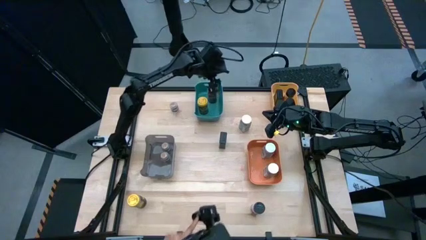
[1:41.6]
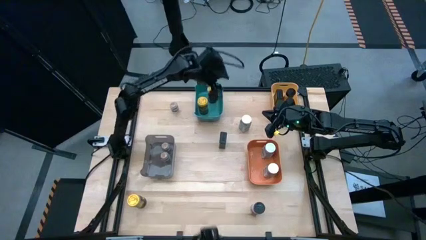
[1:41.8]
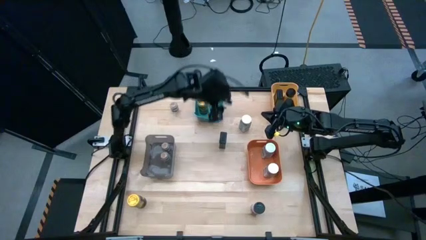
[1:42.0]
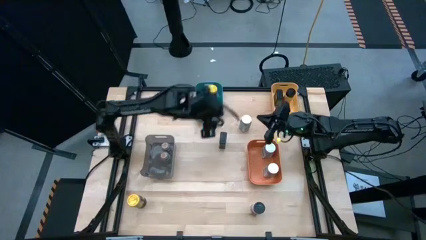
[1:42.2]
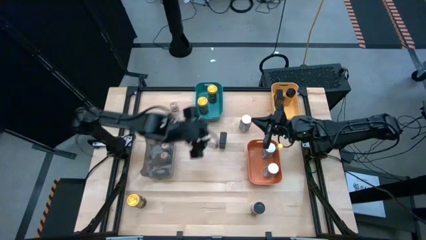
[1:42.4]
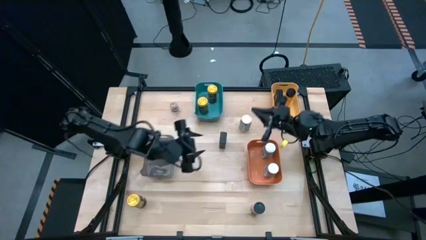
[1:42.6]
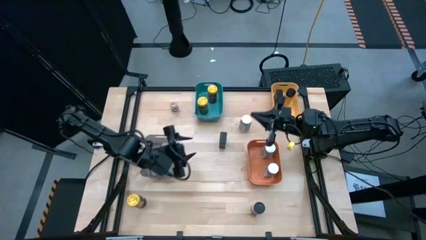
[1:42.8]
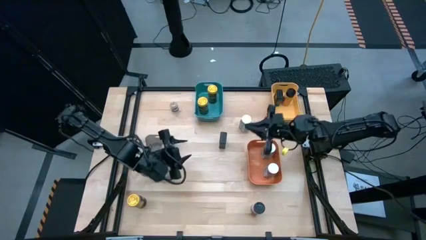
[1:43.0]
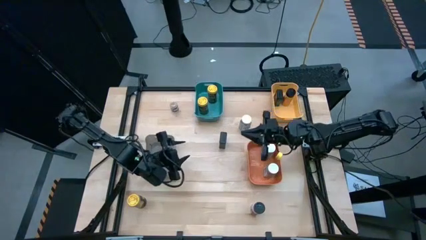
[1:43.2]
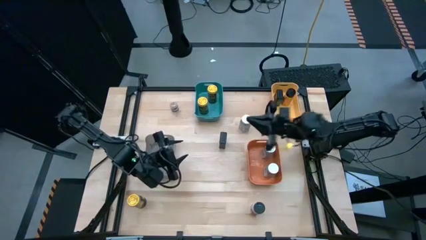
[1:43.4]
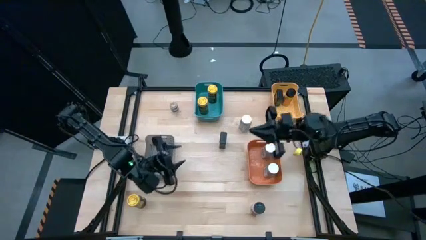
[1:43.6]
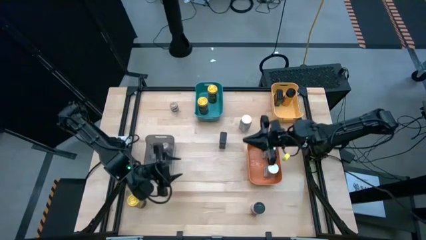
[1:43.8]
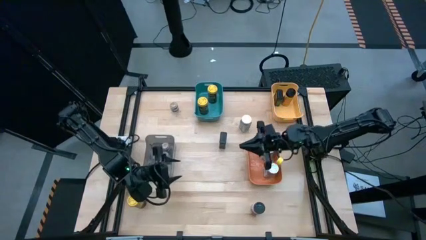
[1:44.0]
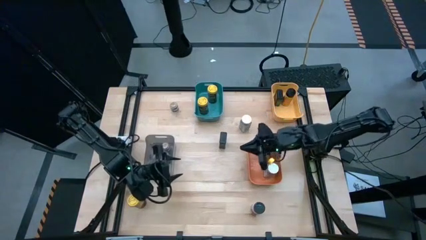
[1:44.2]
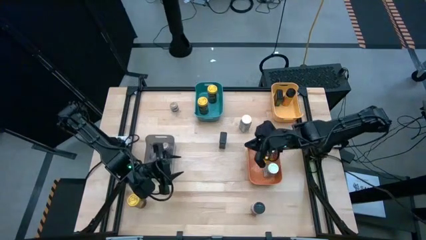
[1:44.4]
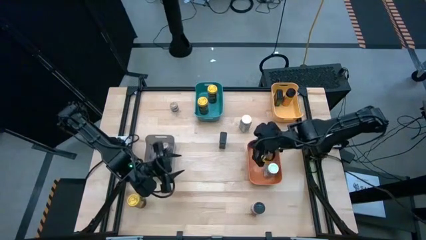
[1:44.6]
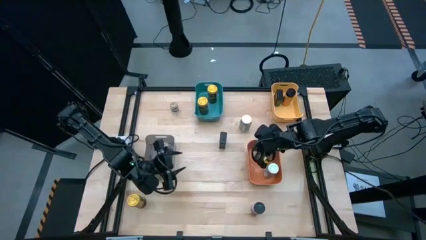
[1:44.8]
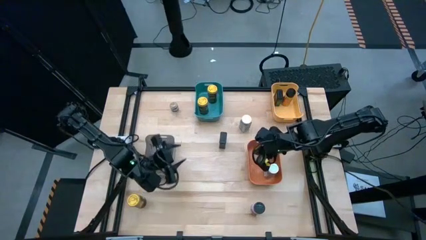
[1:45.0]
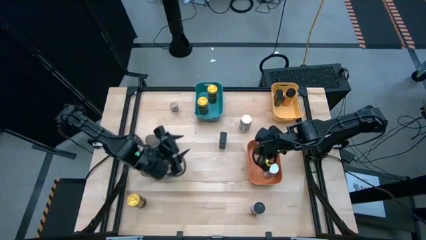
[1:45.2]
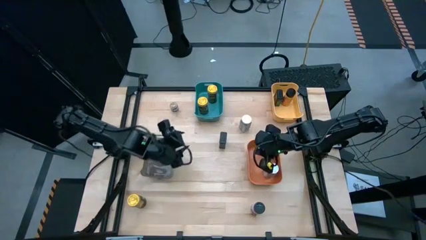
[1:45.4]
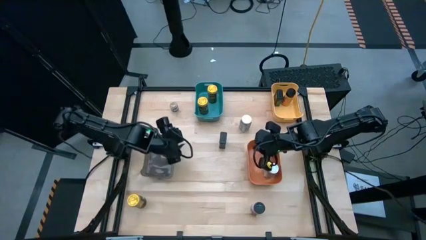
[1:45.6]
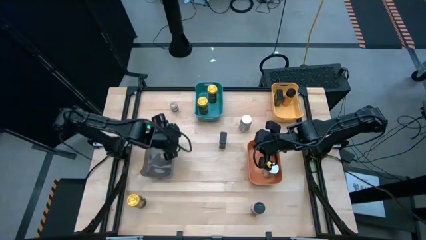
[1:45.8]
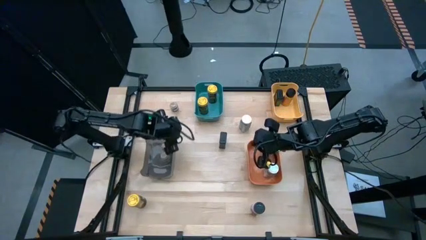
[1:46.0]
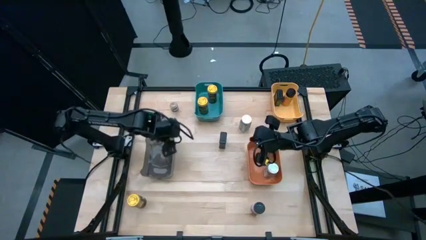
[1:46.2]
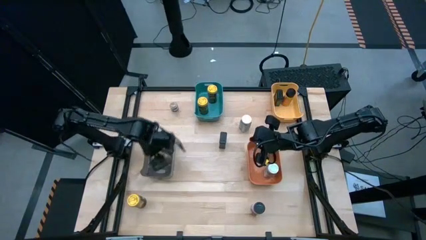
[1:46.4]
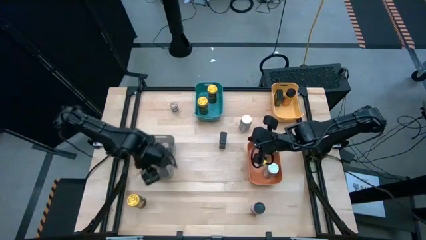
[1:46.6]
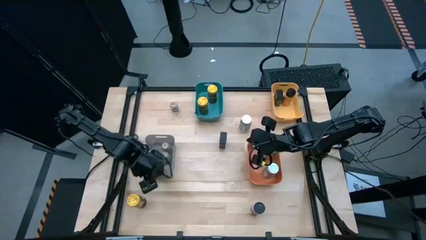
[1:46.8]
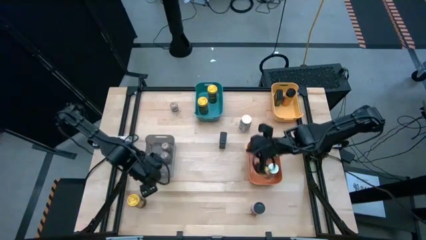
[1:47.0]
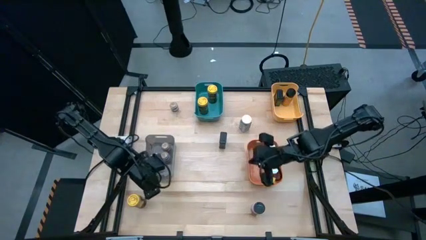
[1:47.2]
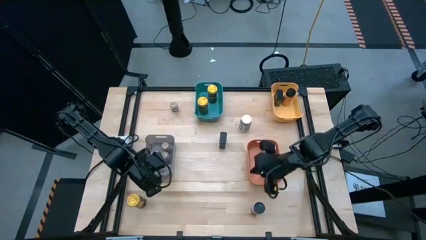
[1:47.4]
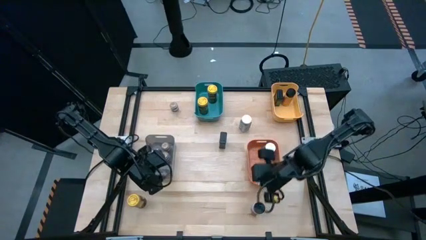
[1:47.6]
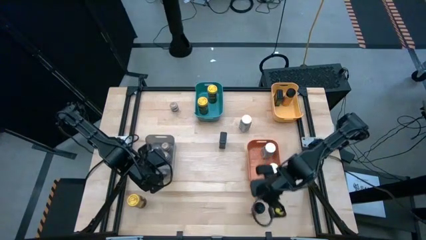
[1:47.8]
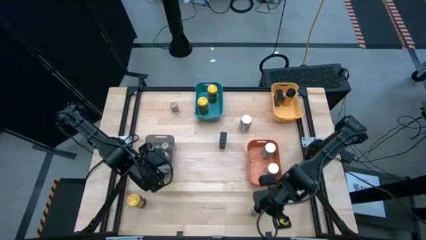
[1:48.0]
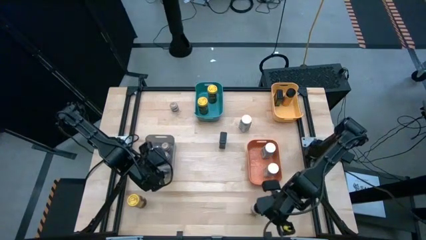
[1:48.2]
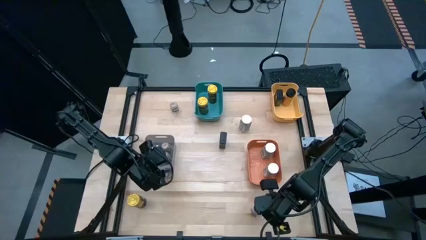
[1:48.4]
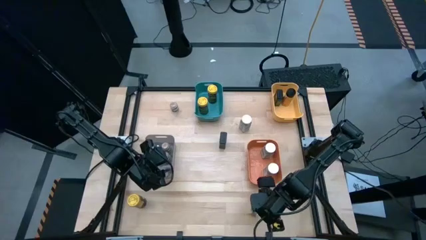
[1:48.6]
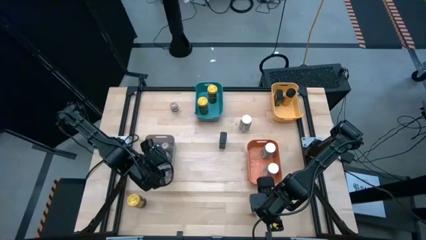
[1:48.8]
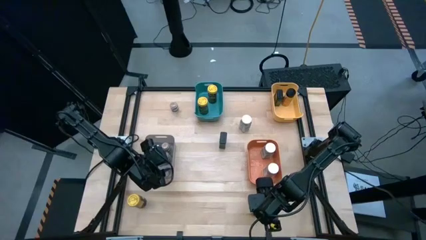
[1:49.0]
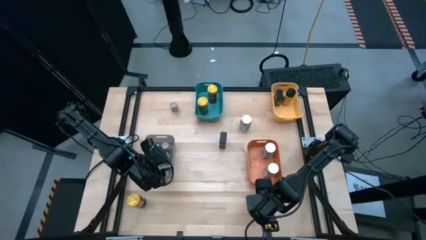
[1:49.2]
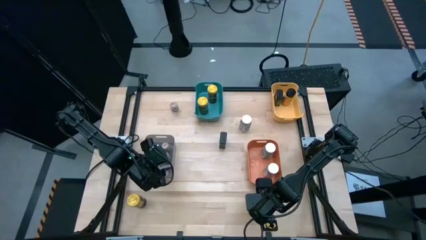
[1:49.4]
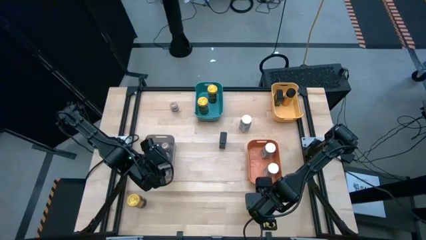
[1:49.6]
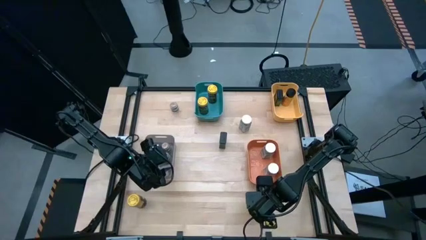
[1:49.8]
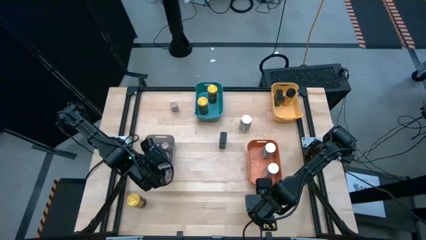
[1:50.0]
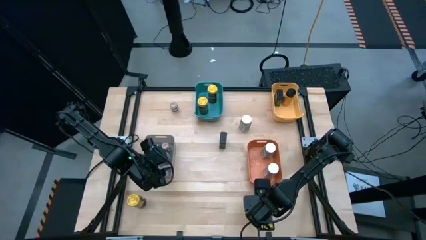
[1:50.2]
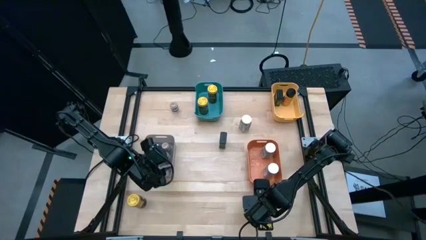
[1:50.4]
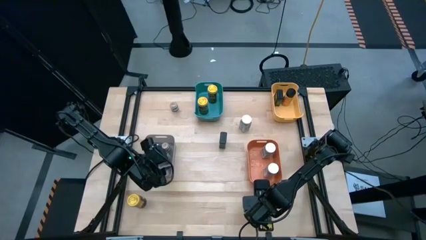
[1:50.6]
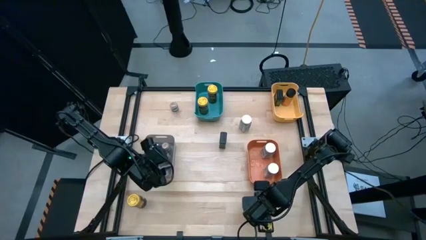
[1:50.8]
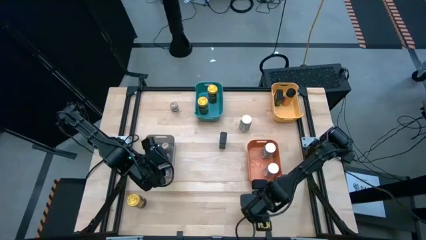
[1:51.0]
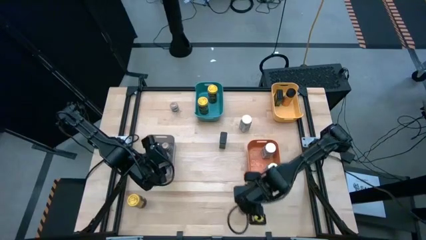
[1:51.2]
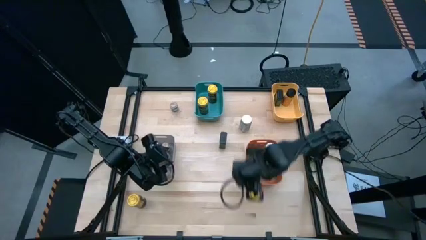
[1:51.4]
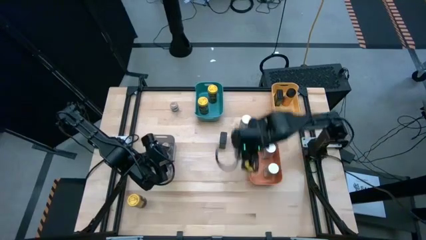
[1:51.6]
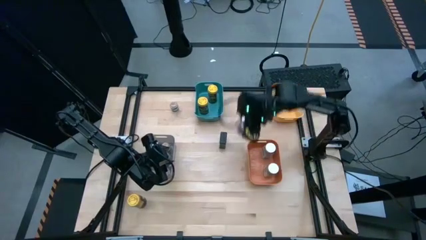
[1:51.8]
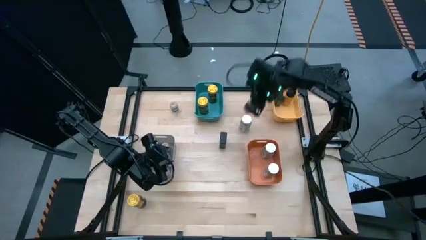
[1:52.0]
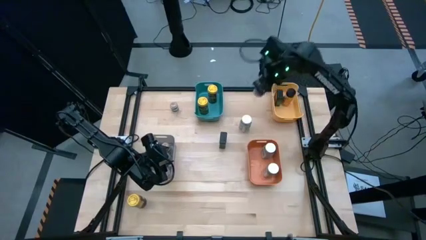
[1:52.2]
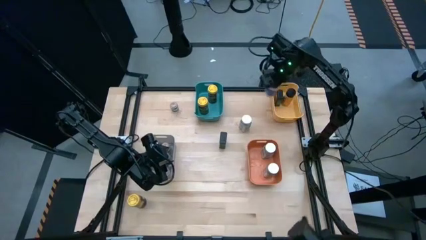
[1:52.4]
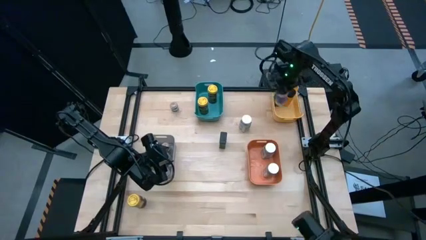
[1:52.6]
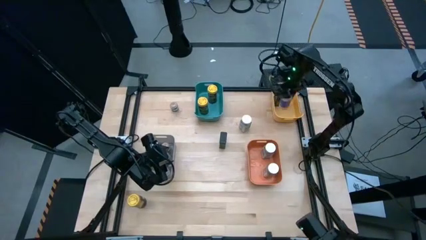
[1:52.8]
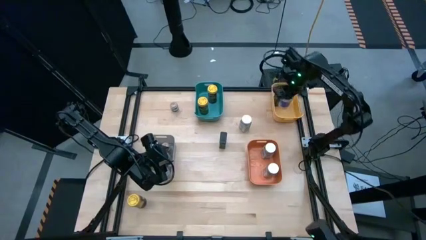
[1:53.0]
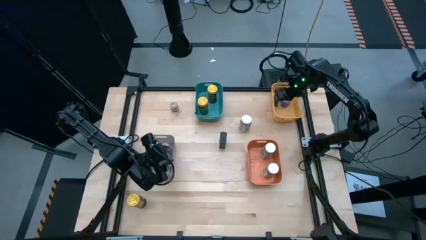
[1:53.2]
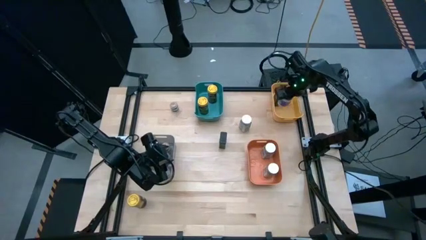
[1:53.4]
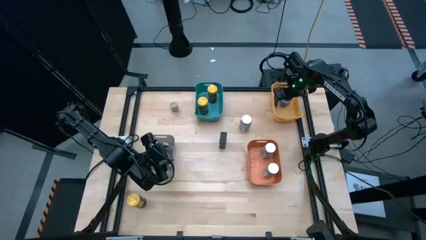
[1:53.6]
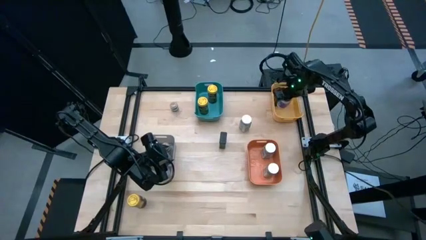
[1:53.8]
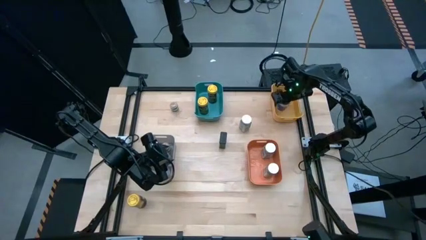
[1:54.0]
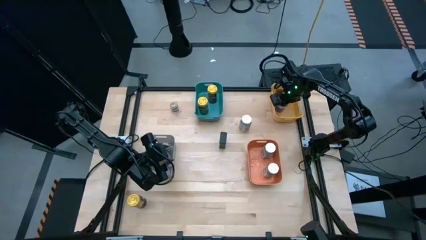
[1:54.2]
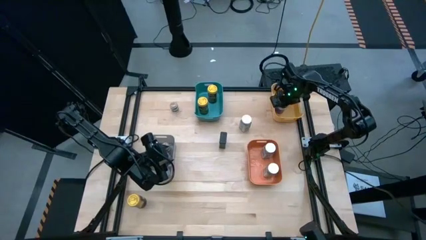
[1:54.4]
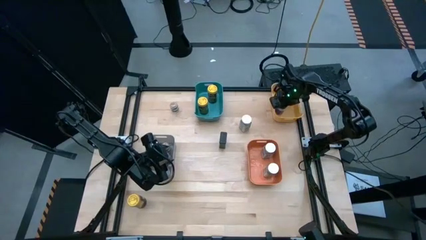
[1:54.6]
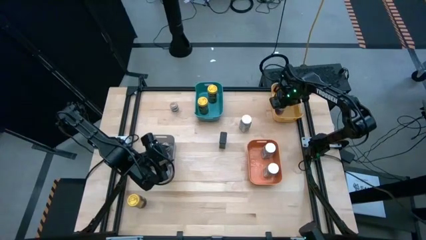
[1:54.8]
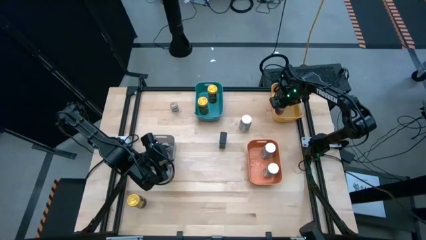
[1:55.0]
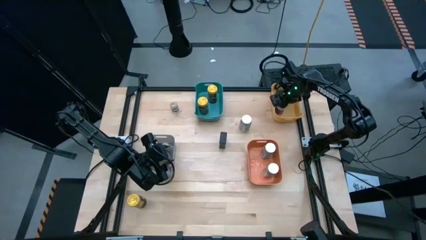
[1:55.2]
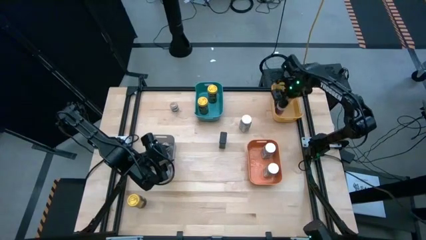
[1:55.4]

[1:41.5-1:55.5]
Task: Sort spices by type
Put the black seasoning bottle into the yellow bin

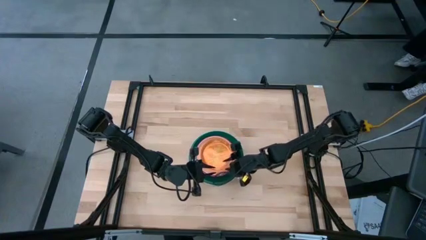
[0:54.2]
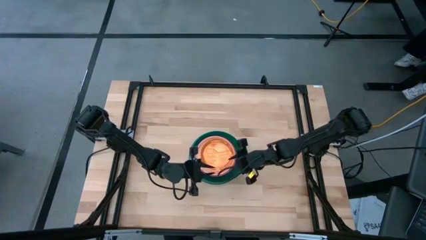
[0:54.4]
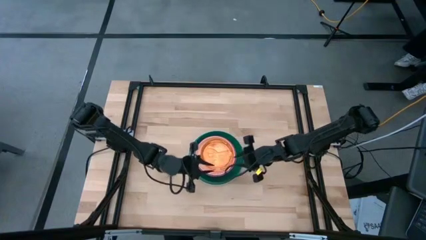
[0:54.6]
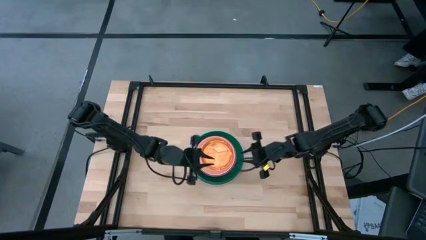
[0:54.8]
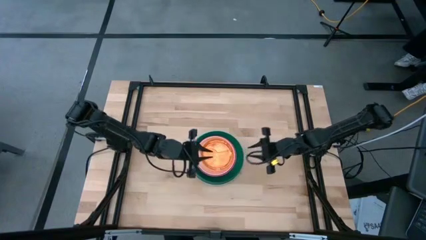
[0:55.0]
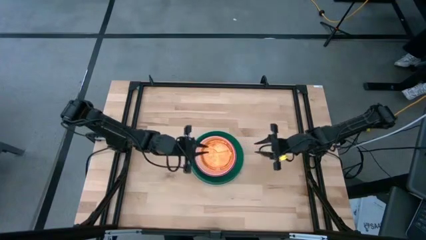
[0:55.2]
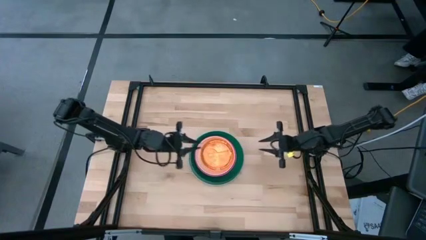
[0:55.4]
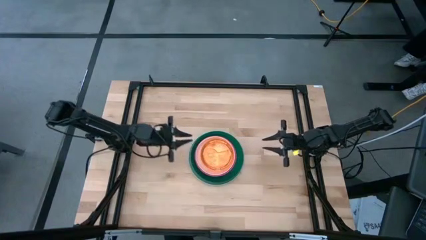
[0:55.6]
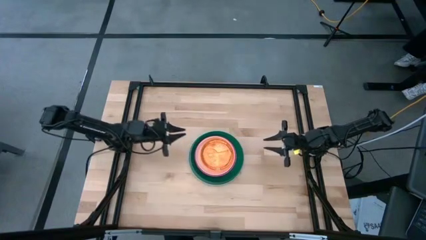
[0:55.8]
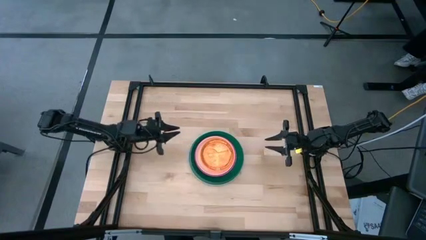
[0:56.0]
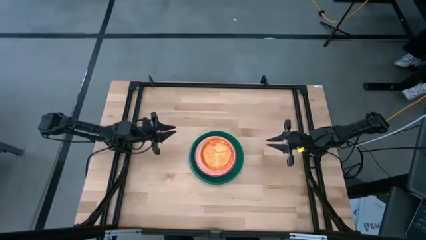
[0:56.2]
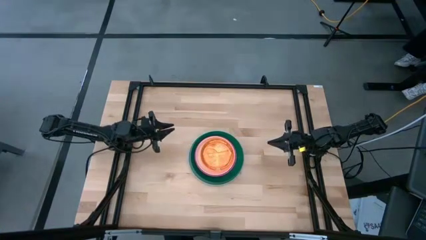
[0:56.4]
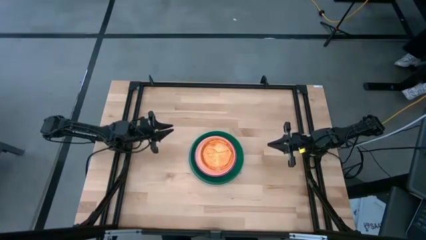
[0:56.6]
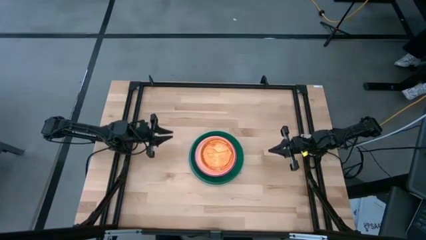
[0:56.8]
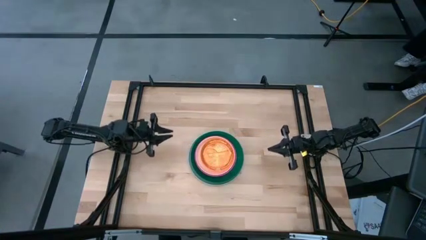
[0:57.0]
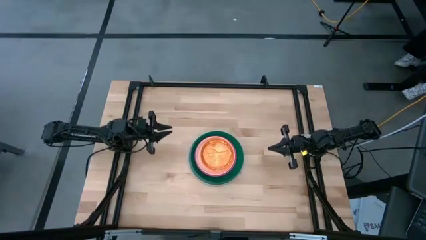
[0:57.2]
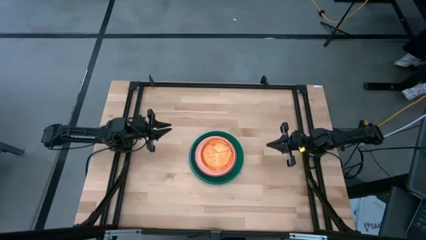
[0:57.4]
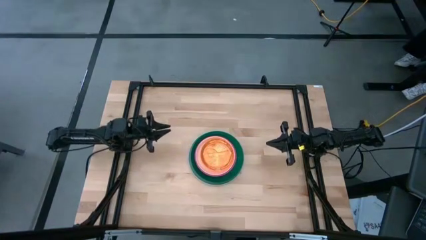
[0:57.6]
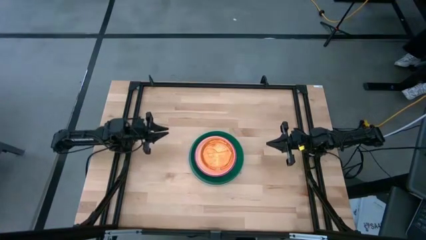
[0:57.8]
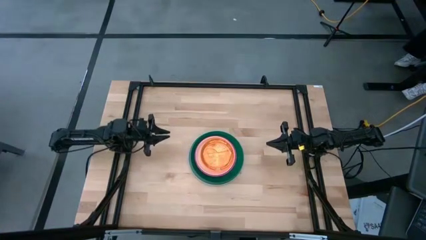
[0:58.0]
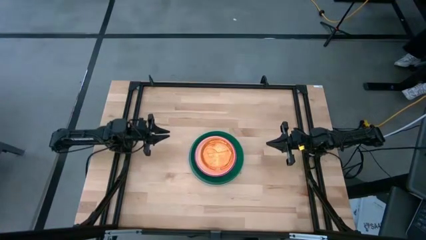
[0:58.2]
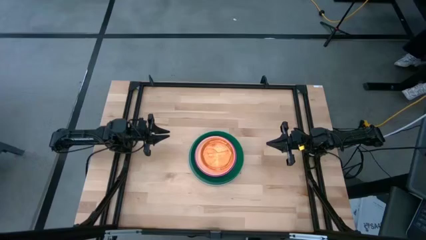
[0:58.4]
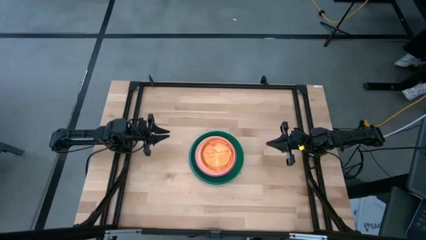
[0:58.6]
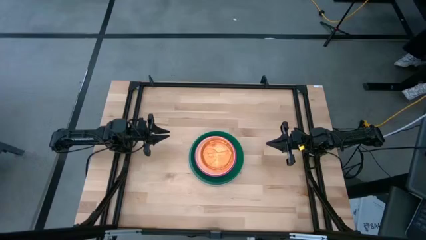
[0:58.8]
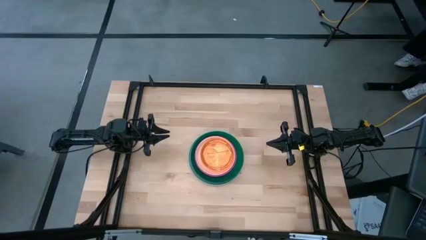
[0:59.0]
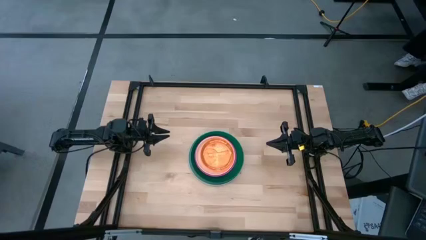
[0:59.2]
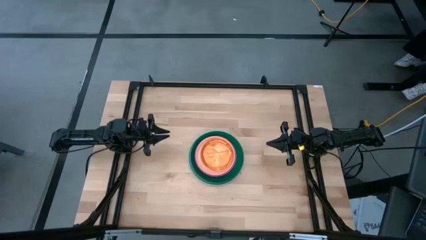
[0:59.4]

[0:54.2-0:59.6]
Task: Stack plastic plates
Return to Home Position
